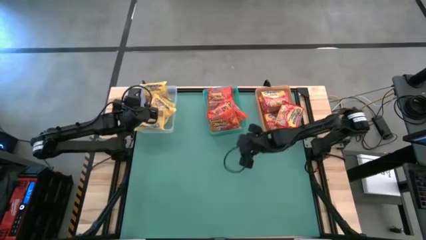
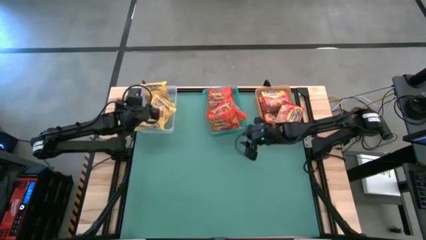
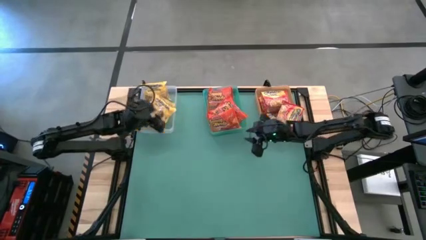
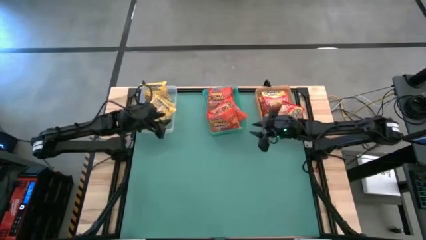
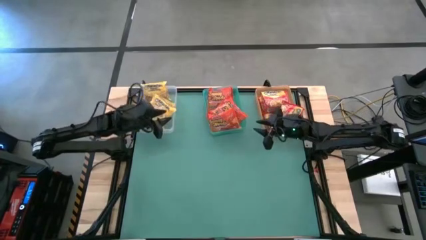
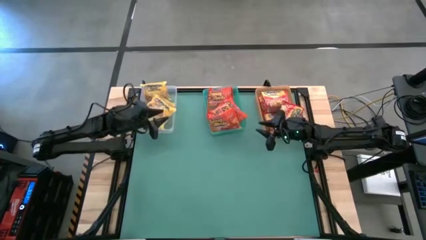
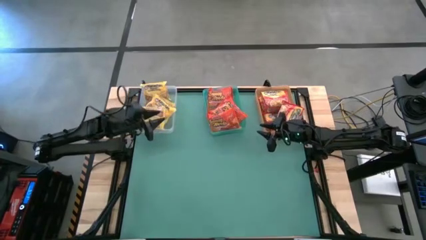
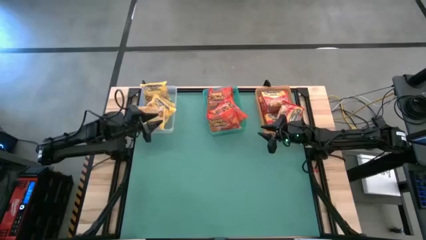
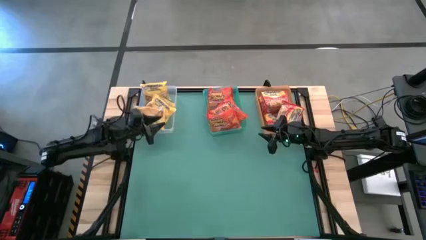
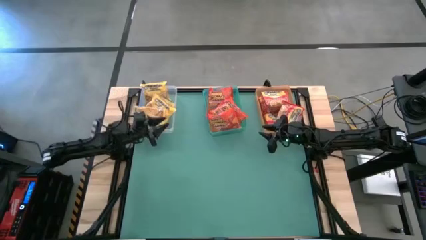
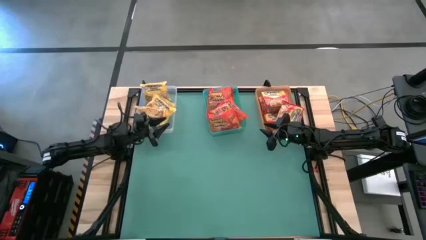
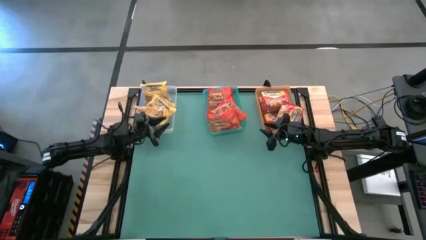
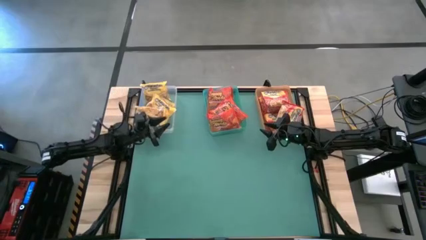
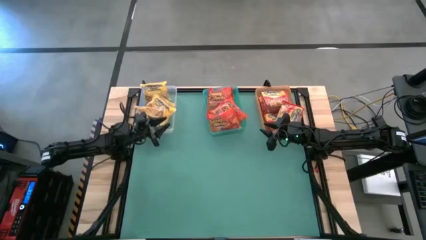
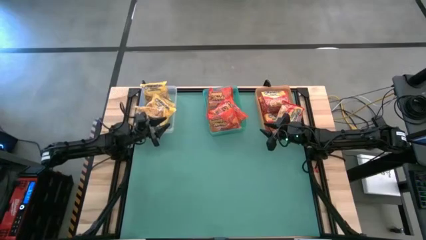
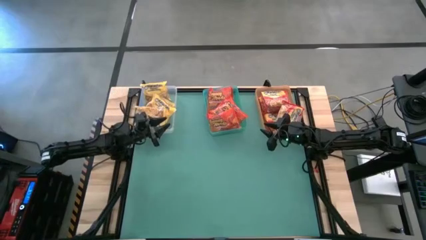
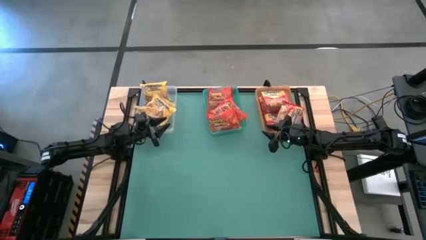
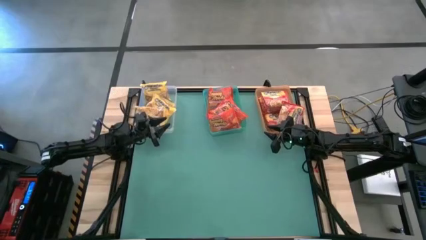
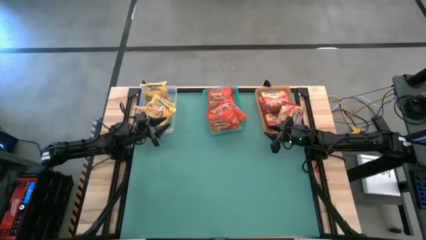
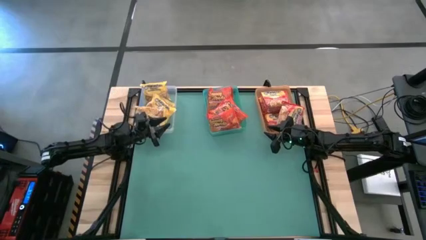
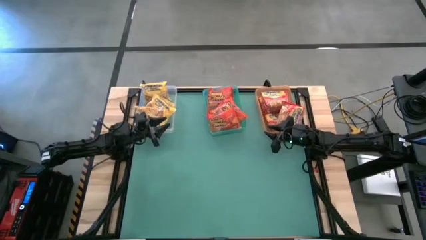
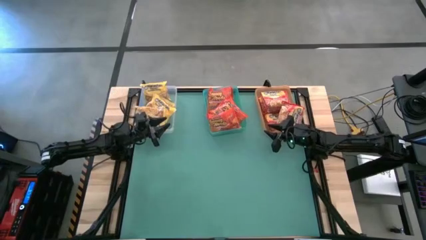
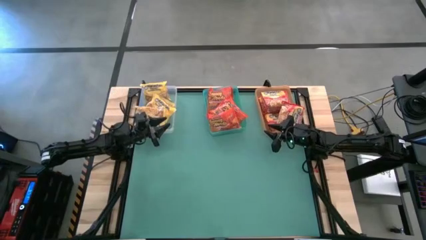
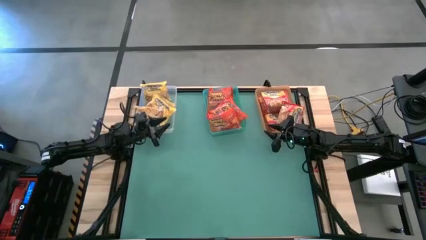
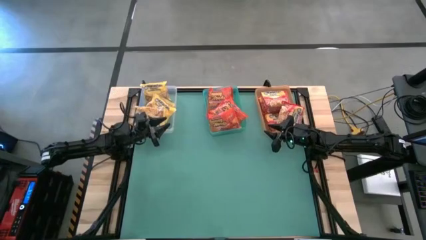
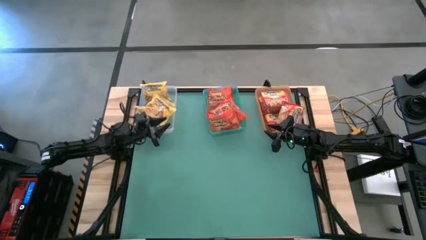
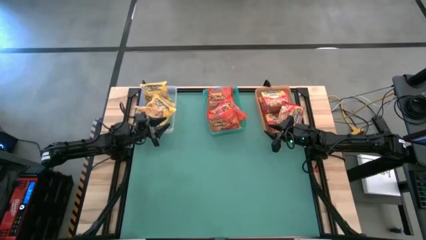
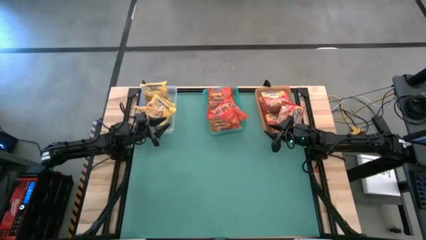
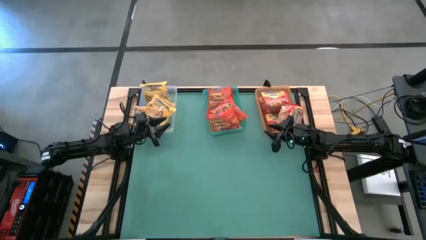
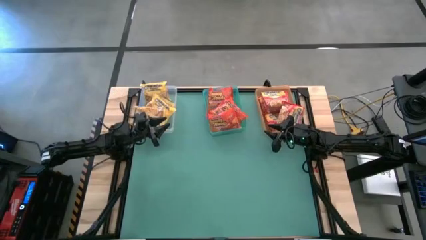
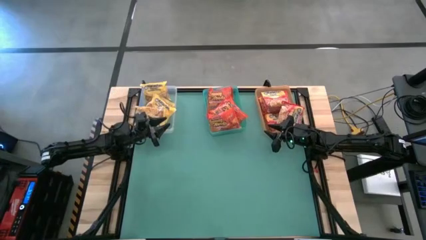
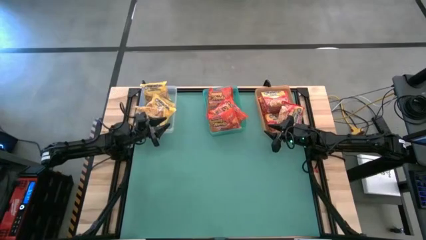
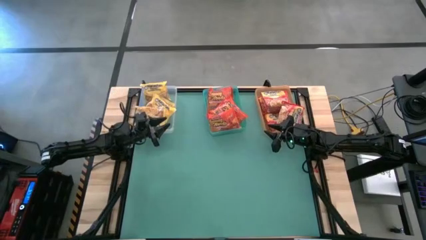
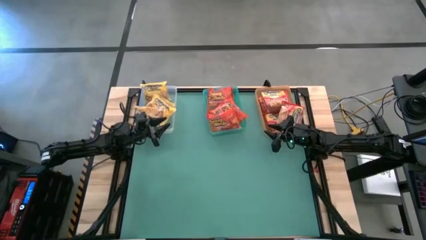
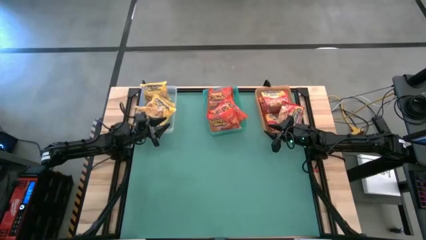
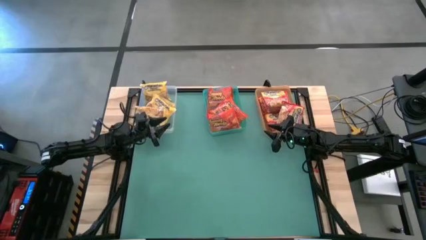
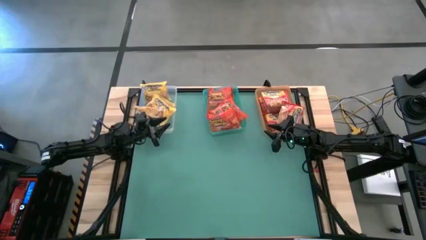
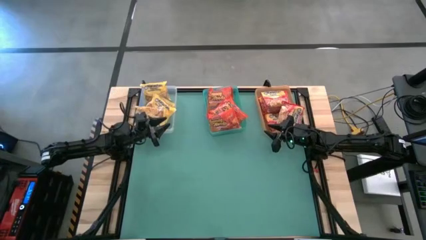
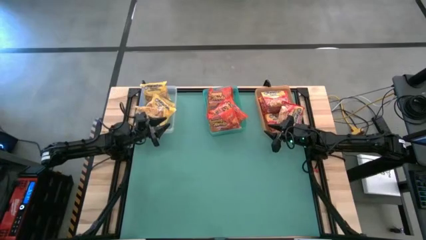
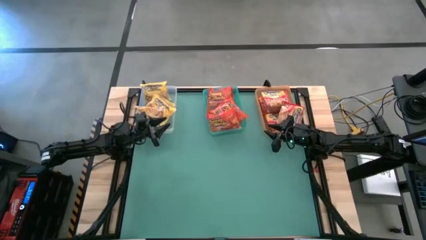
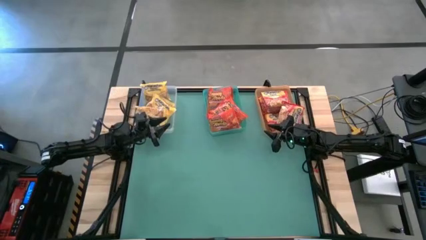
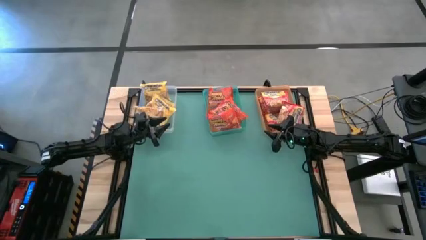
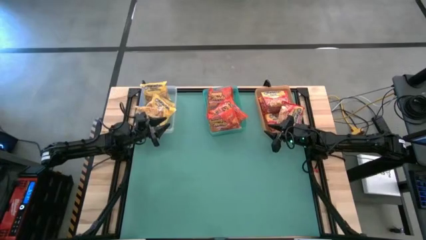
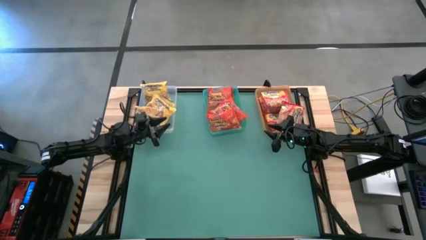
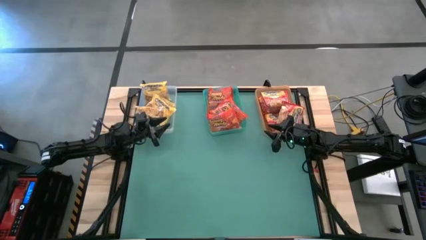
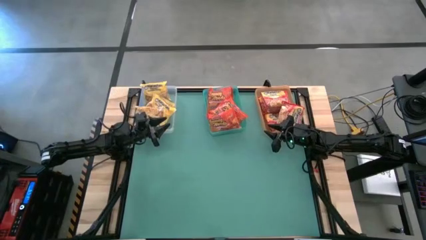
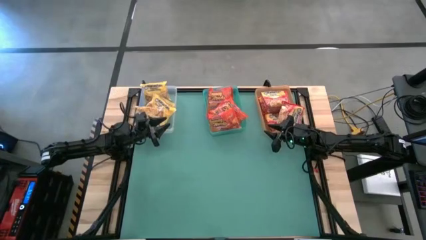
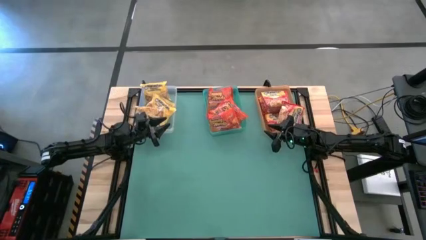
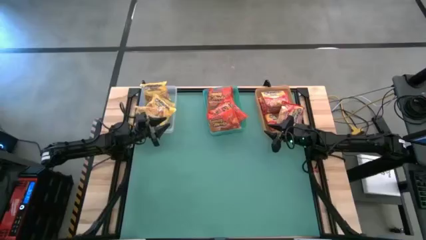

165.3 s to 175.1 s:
Task: Sort Maruchan noodles
Return To Home Position

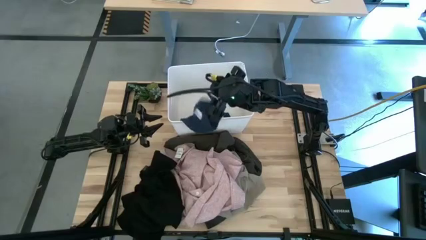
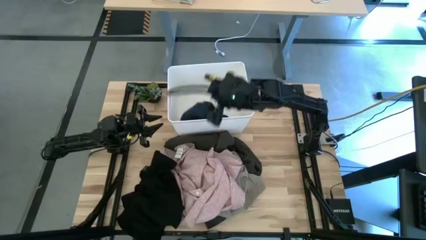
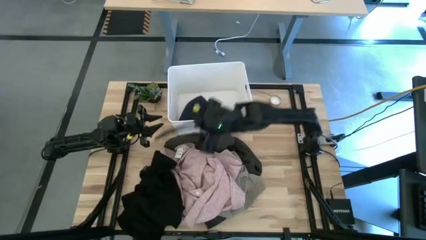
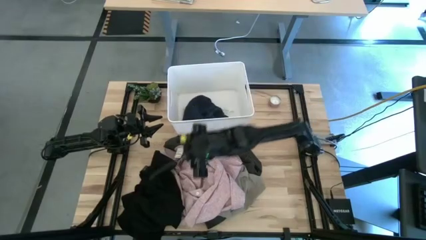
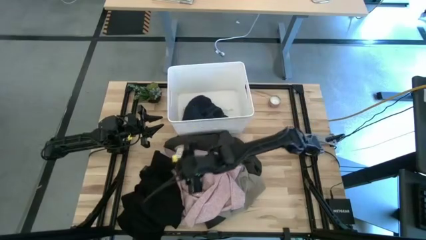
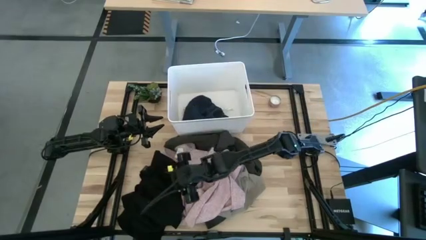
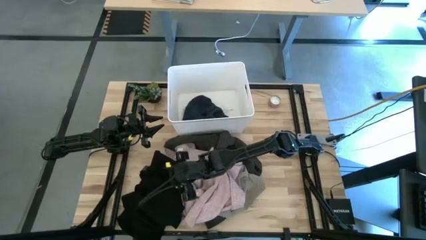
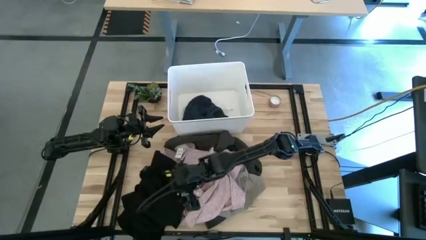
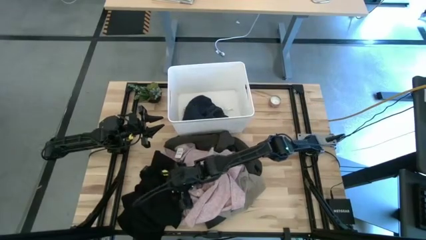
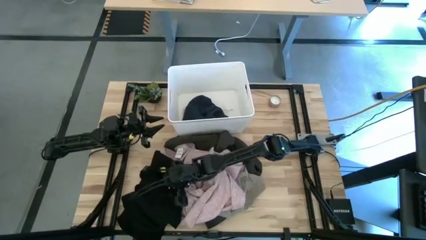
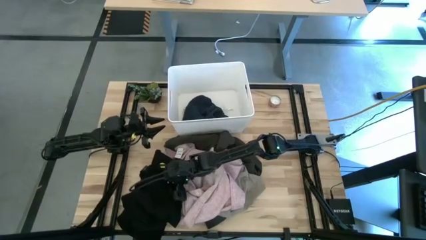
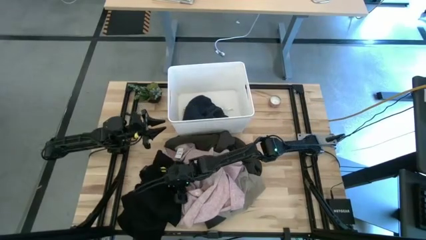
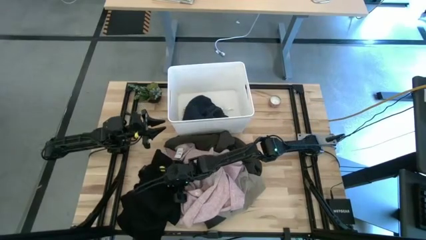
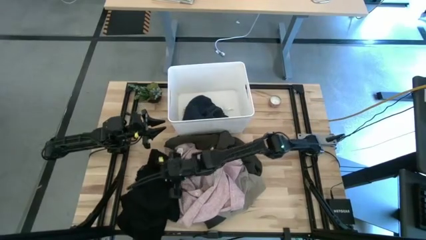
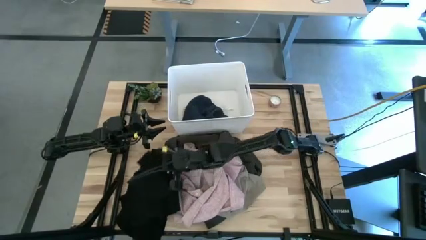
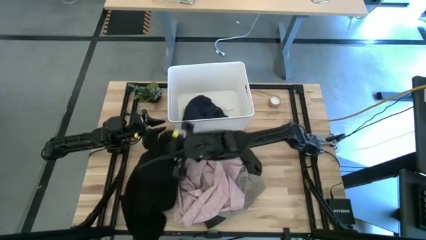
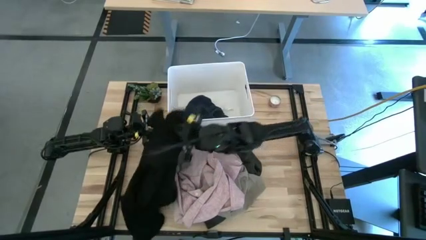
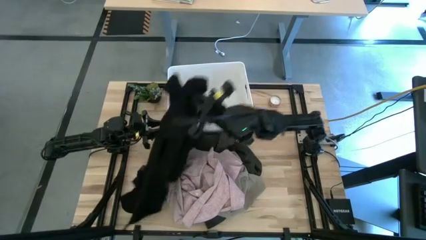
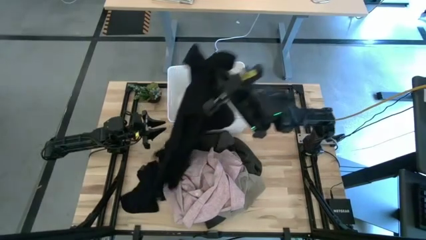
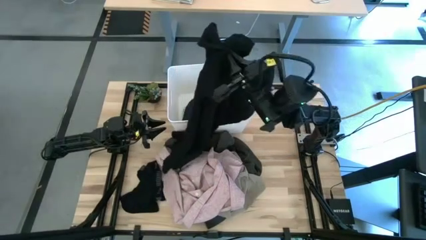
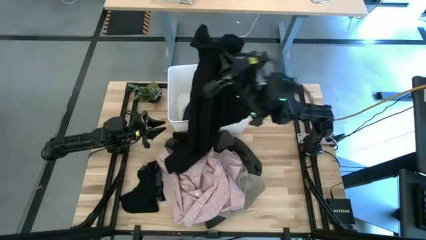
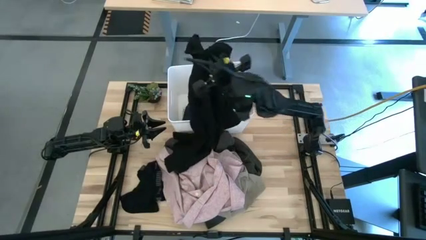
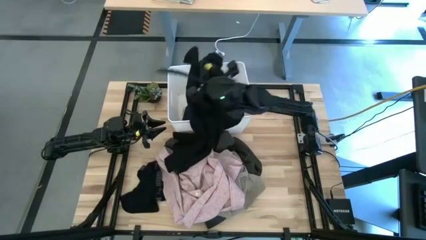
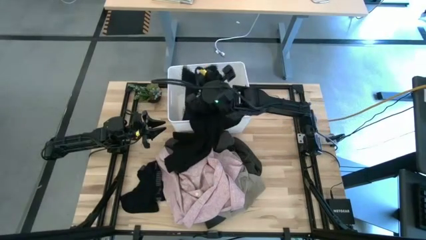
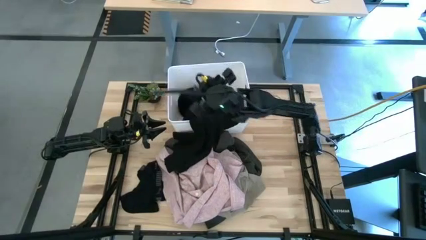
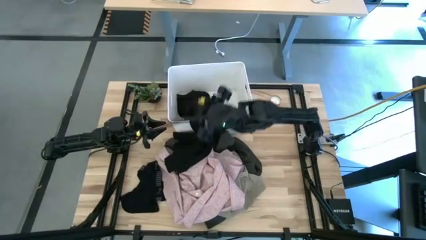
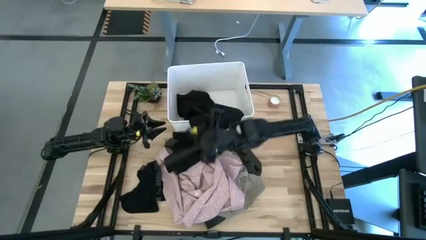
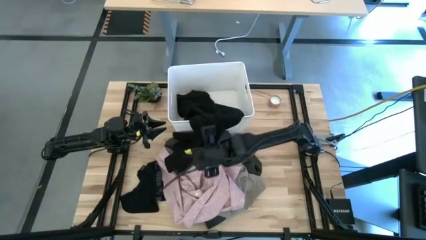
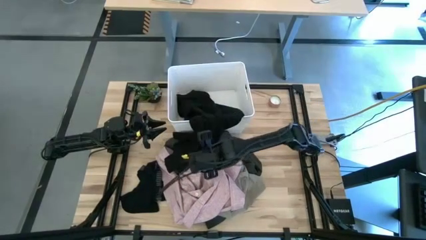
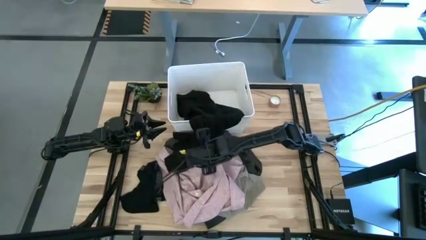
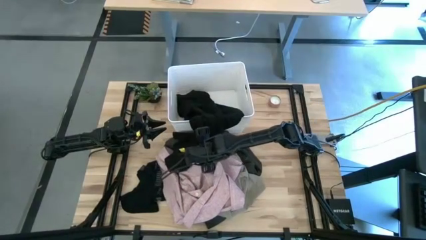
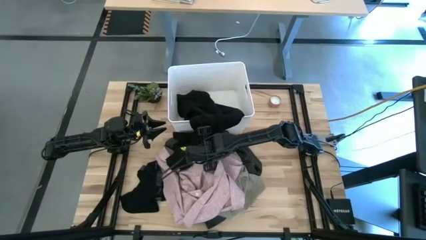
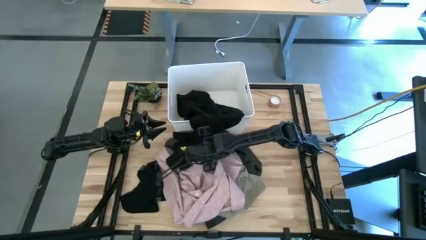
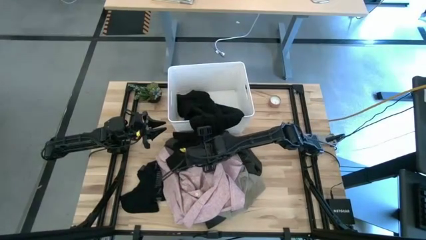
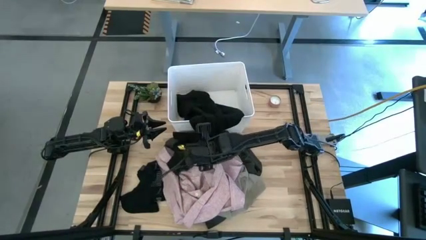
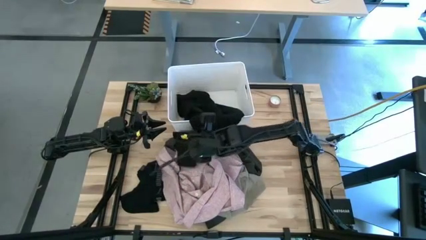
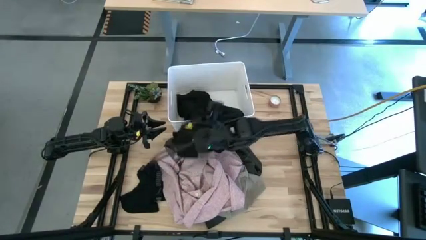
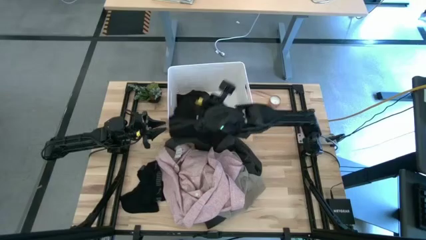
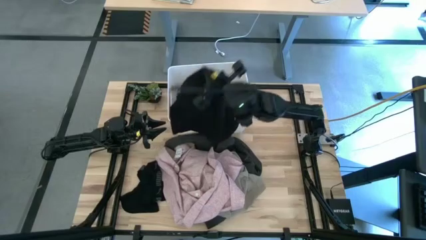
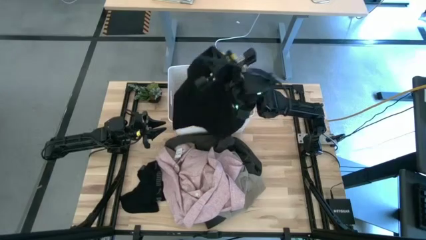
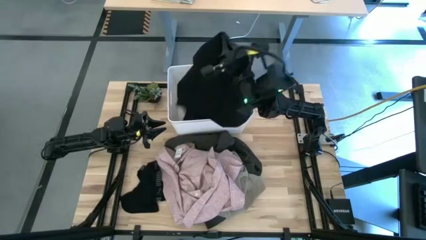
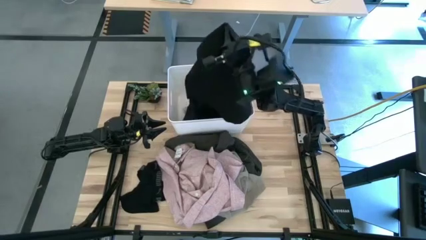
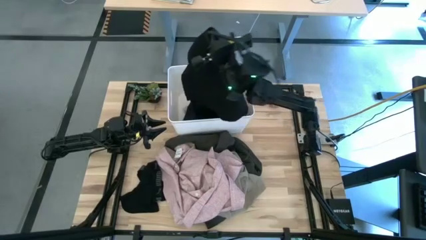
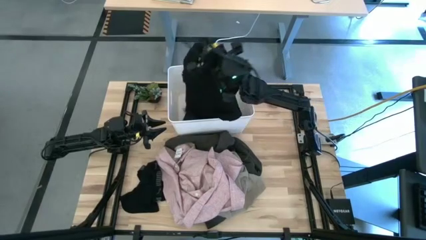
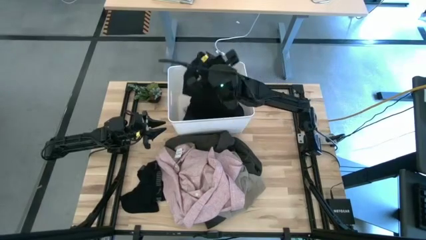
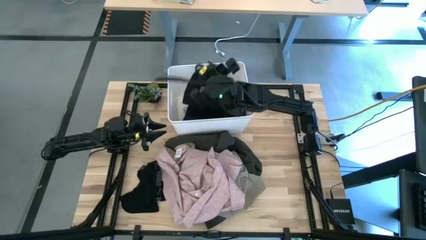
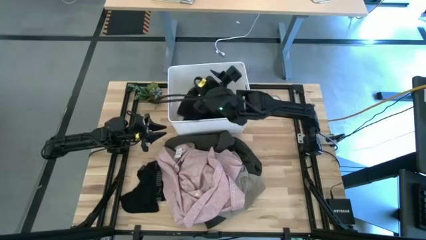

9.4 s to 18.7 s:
Task: Sort clothes
Put the black shirt into the white bin
